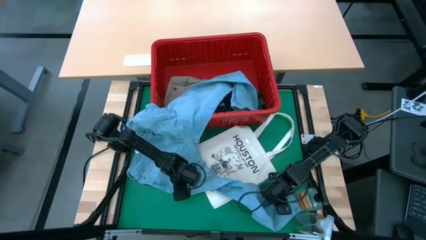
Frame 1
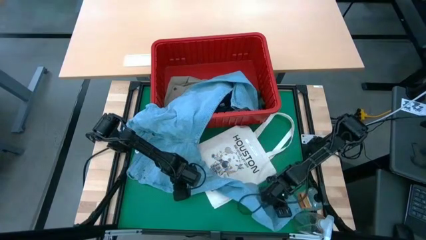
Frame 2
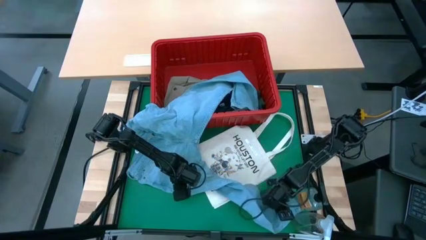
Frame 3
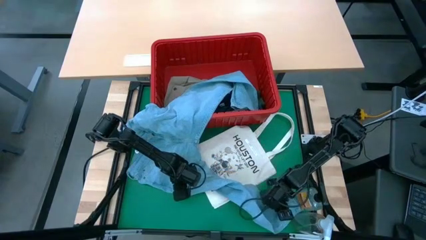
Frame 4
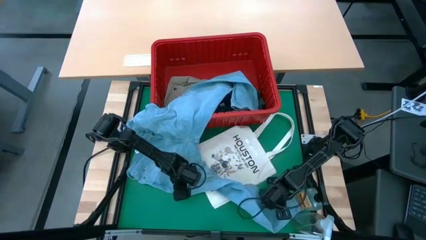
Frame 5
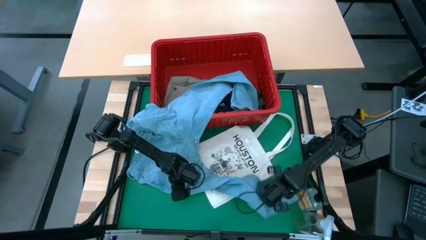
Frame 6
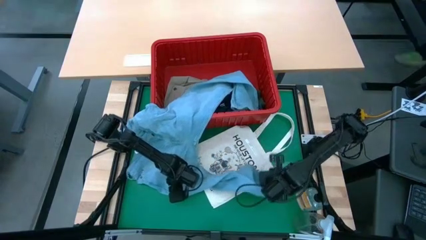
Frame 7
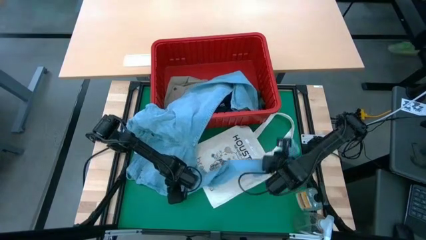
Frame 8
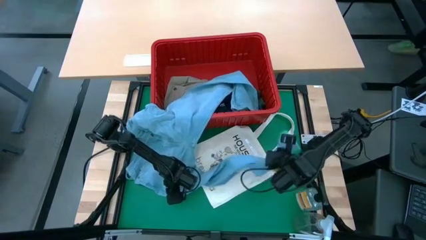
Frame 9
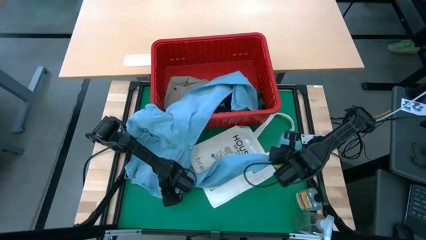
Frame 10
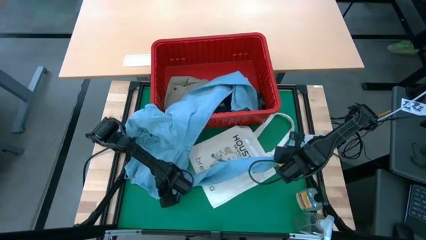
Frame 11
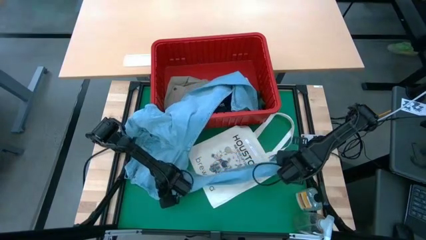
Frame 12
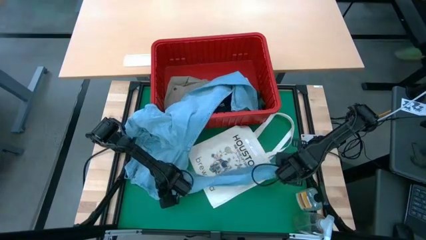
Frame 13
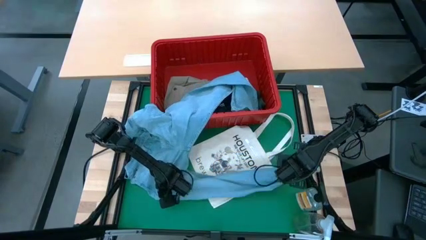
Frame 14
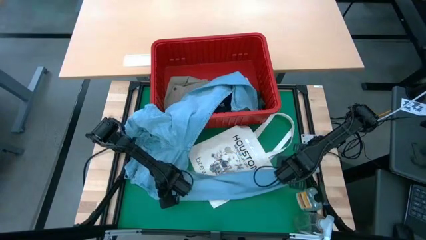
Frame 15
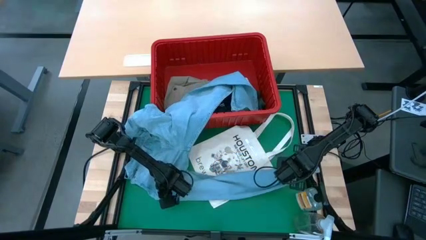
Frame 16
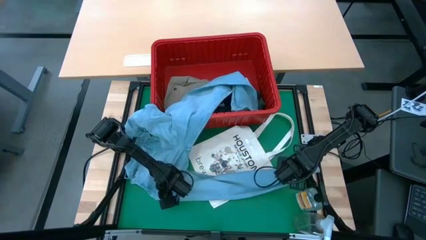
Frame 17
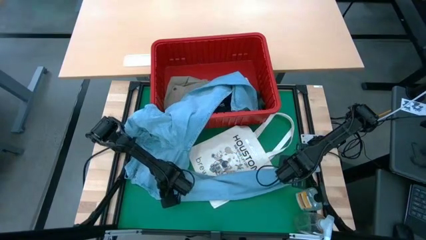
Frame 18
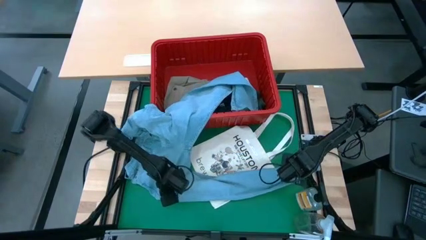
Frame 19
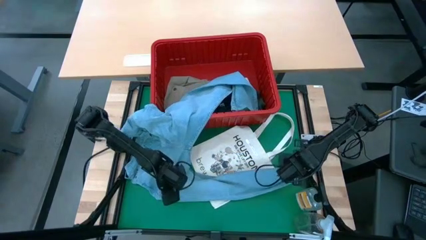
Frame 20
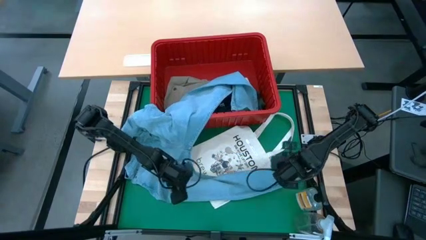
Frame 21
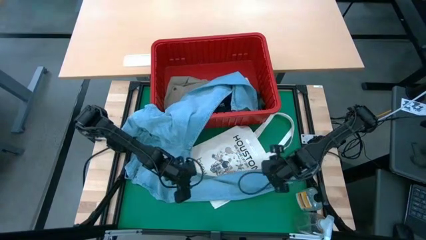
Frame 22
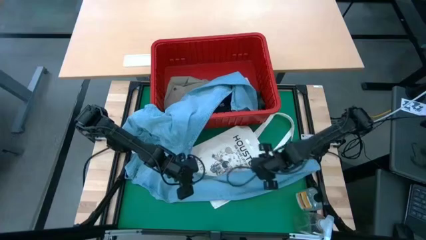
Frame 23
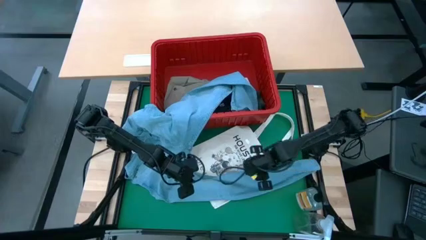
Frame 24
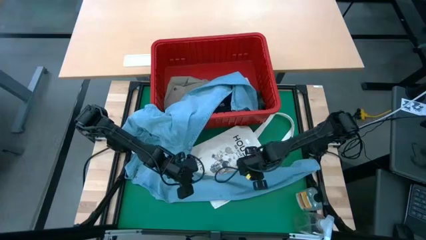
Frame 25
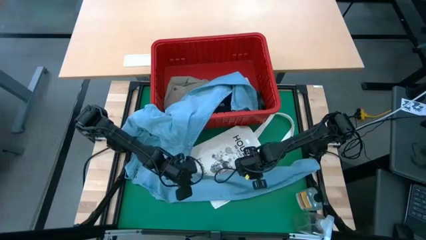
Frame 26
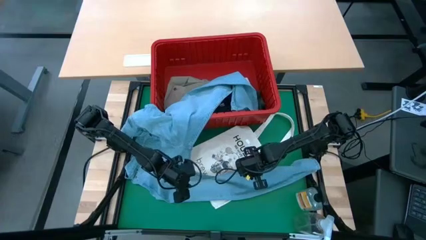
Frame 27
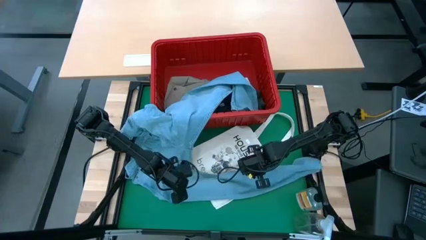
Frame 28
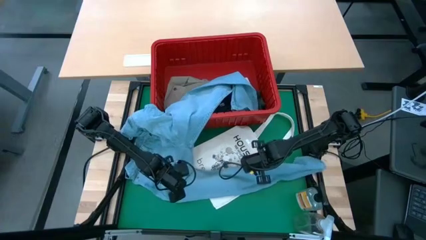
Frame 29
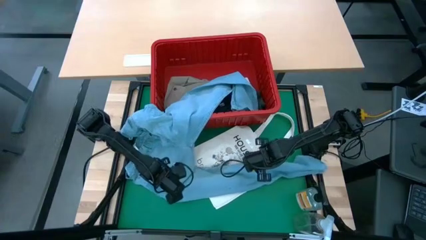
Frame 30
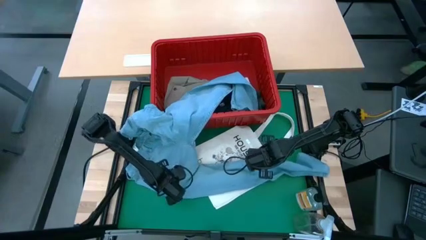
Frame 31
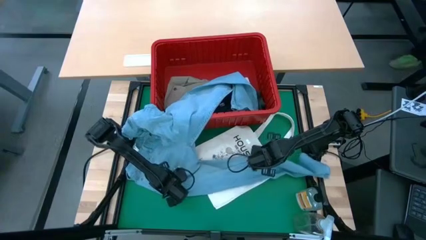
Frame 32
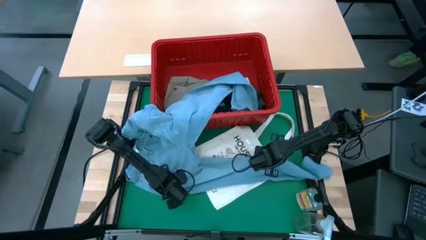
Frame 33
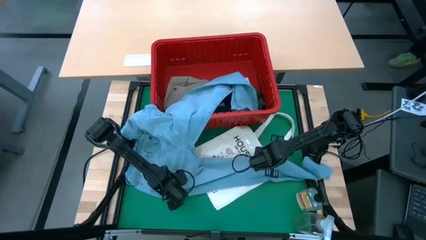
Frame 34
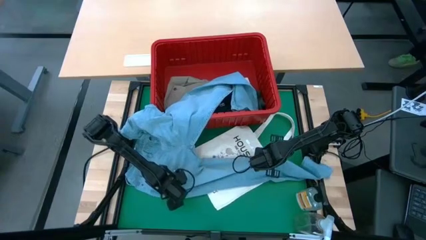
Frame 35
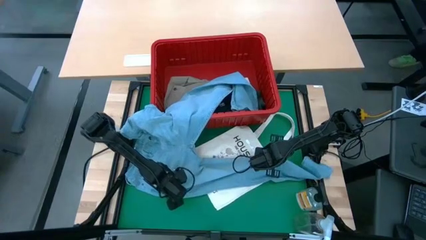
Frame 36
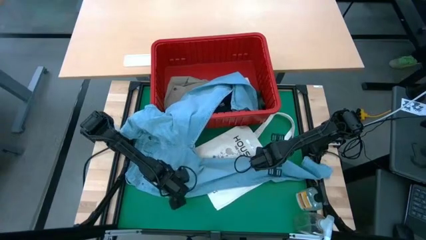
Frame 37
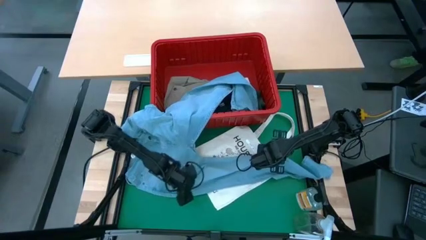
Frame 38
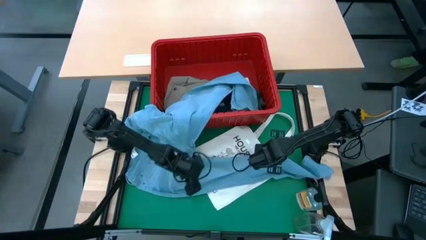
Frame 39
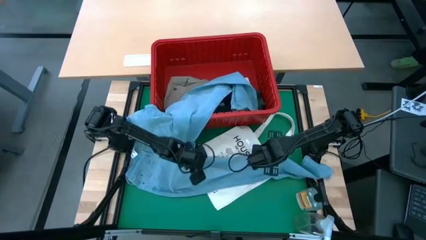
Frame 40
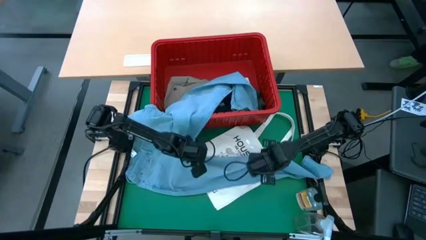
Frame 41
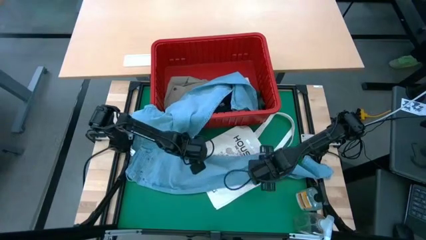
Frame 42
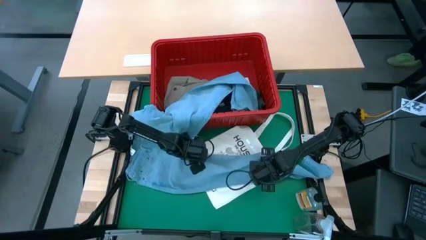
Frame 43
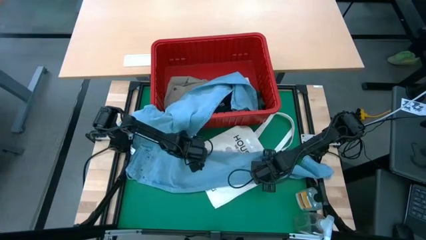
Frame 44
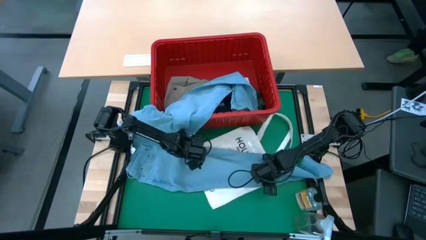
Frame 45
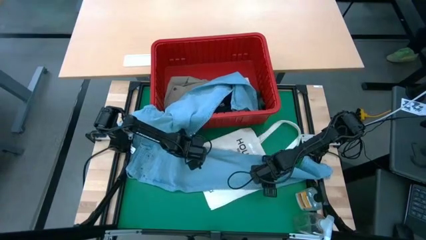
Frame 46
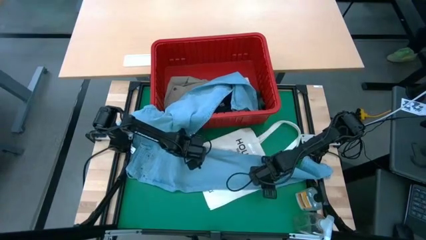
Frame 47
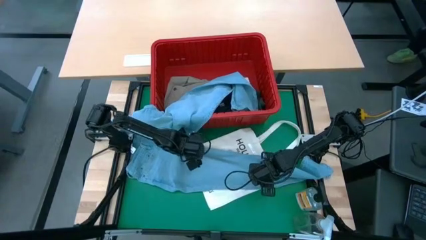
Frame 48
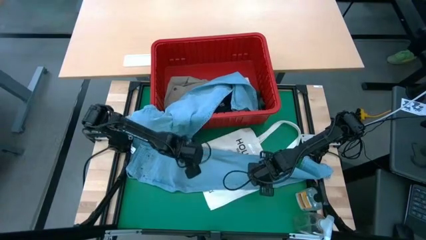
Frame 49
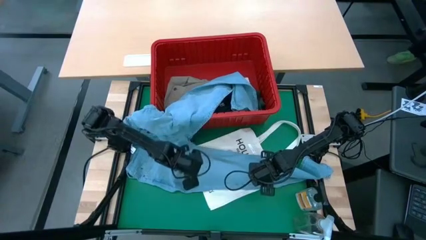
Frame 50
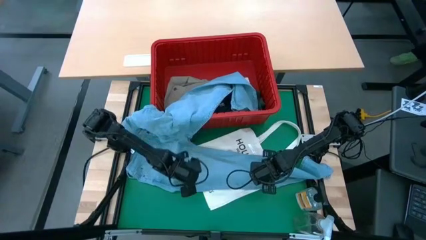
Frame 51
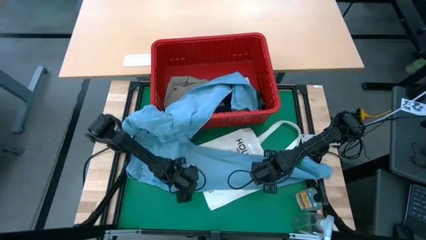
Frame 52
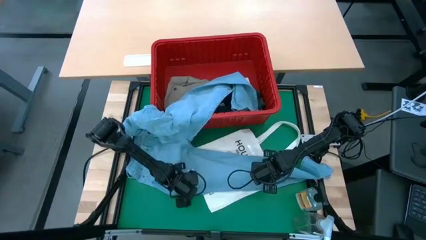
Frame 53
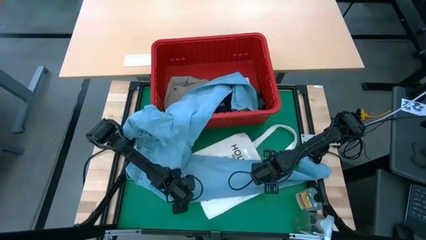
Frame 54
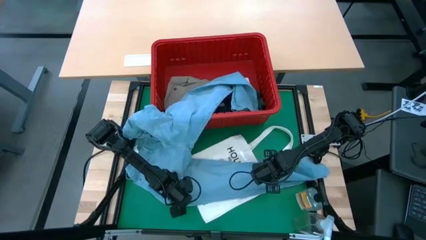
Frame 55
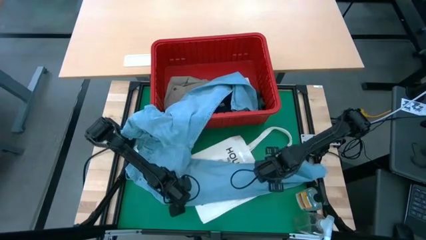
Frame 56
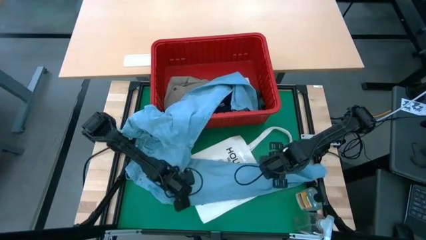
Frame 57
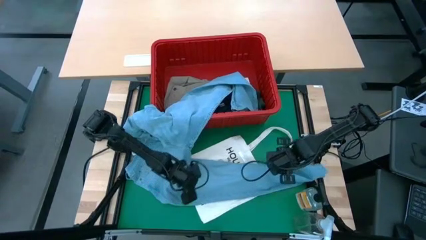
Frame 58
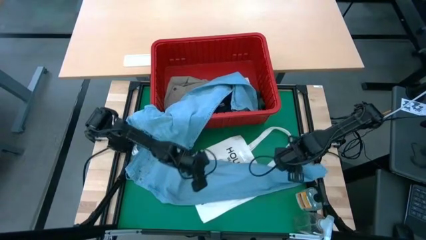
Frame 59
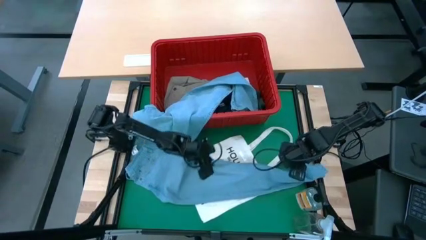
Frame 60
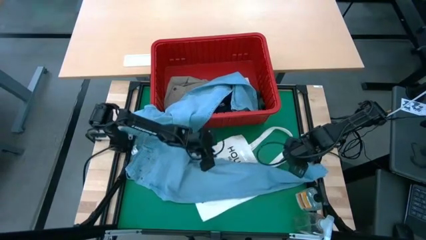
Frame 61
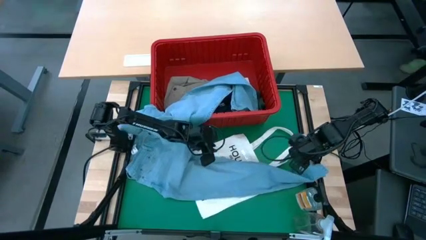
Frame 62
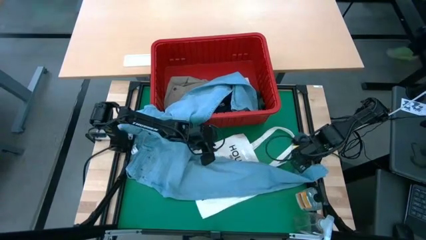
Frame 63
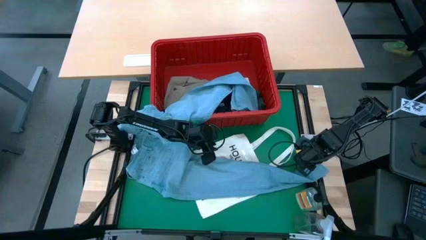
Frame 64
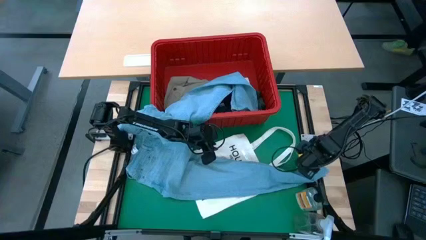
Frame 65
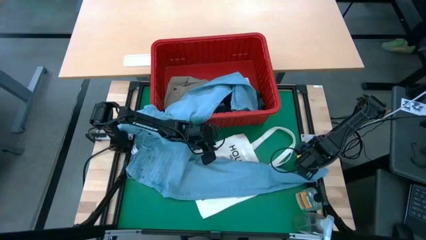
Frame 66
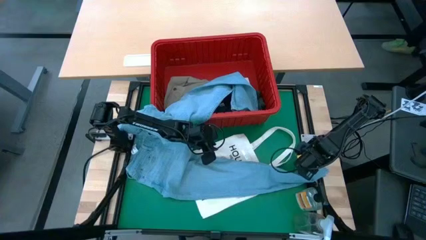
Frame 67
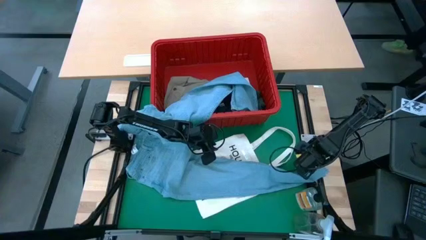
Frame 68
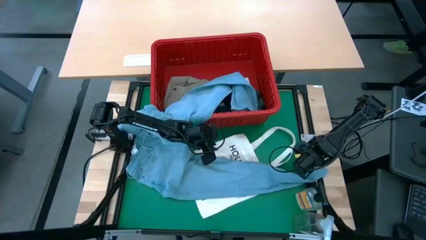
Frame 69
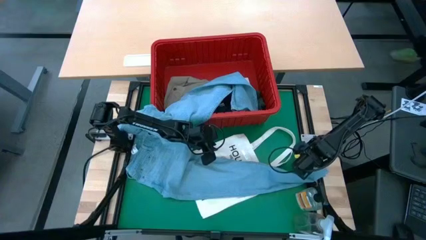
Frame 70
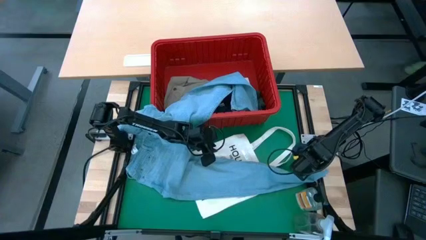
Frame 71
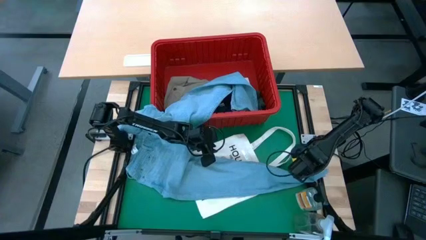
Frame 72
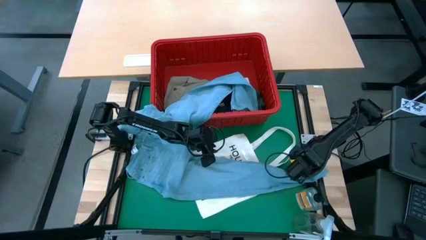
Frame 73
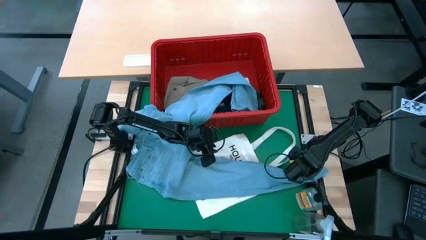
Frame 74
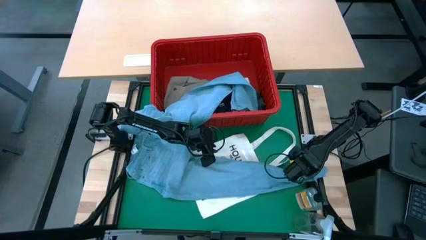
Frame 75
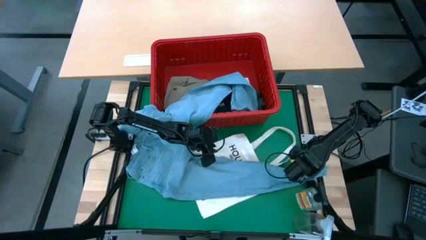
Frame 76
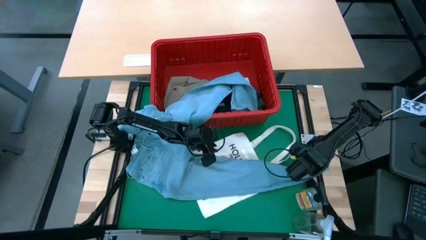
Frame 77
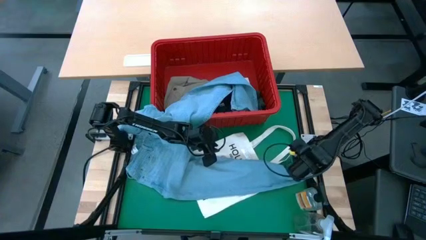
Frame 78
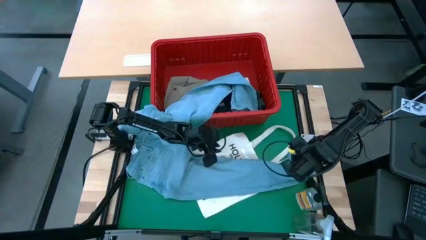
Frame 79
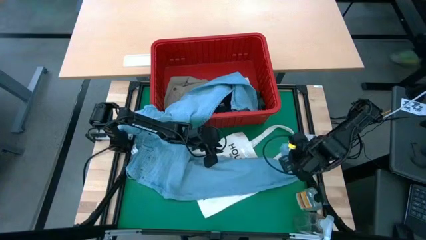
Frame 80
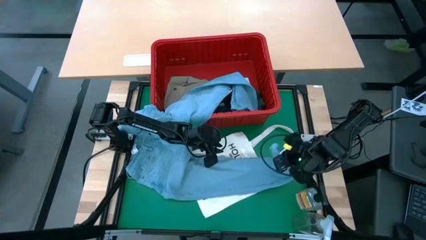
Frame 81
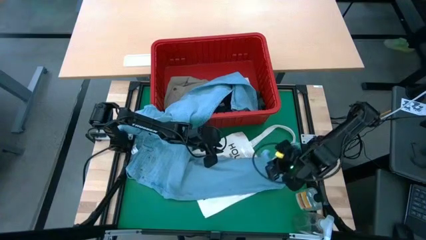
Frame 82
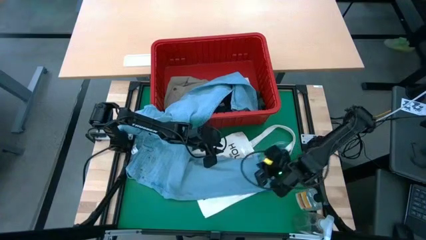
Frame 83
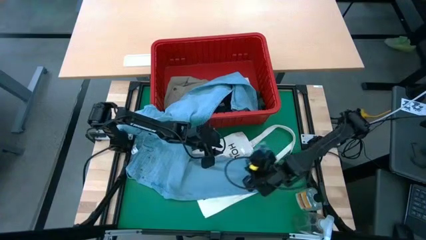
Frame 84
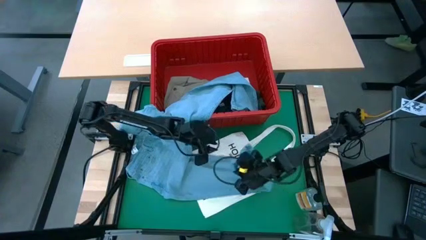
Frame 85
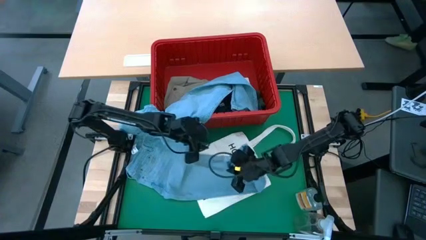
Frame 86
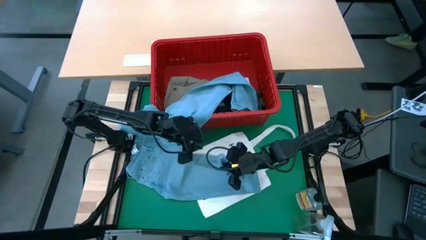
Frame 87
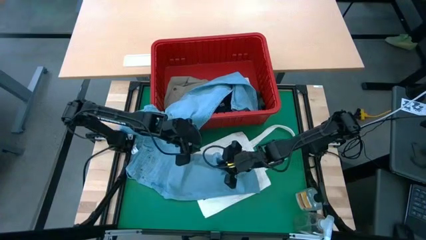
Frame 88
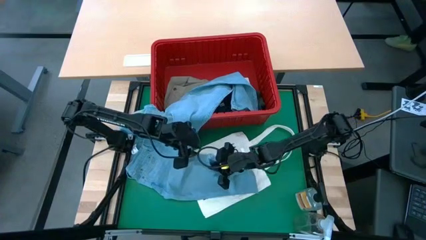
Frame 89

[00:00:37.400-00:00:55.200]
Task: Fold Laundry from Bin
Fold the blue jeans
